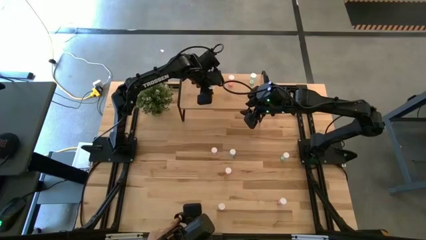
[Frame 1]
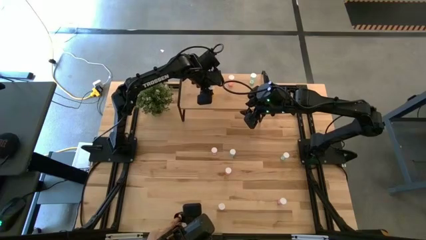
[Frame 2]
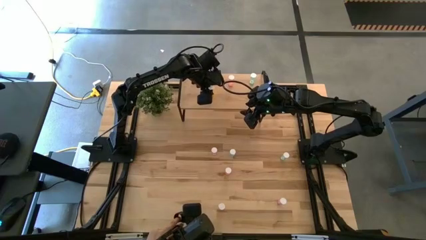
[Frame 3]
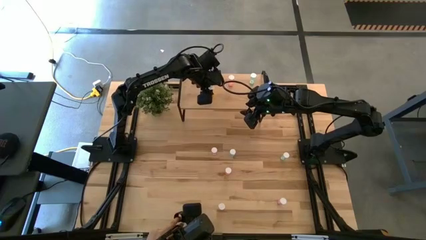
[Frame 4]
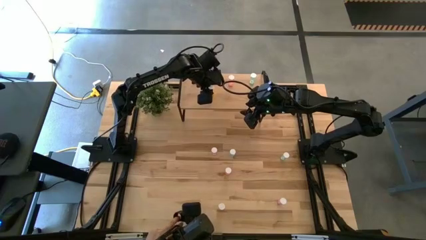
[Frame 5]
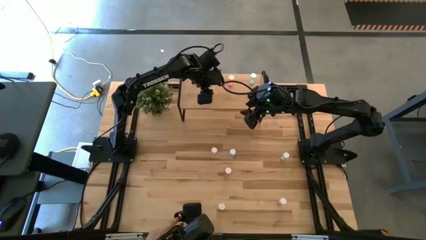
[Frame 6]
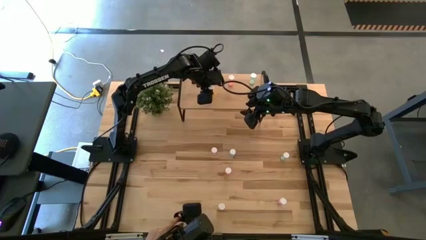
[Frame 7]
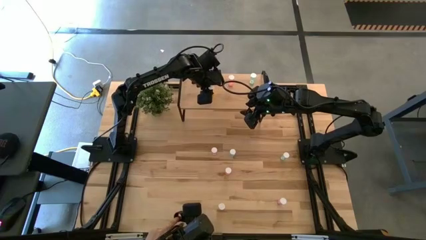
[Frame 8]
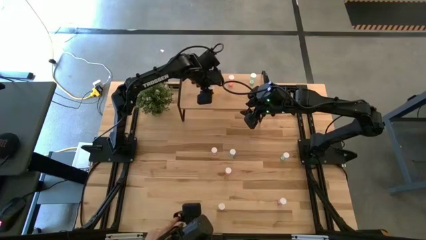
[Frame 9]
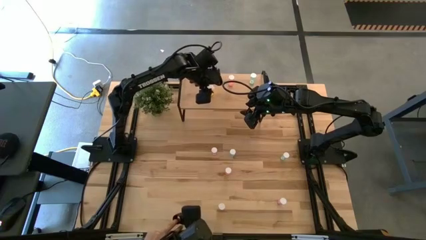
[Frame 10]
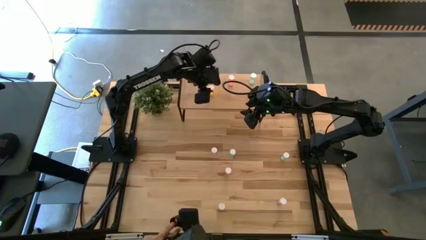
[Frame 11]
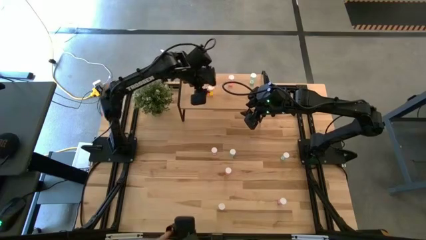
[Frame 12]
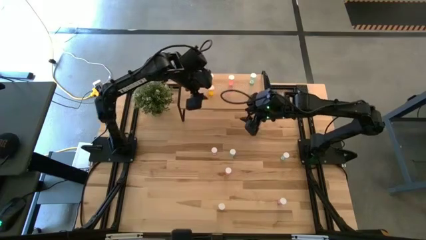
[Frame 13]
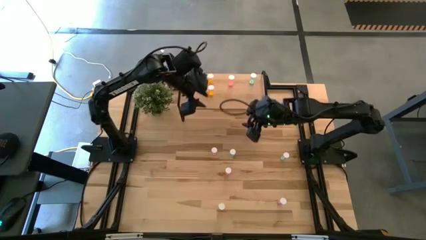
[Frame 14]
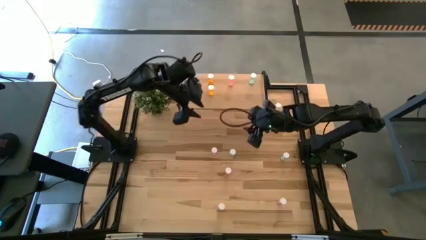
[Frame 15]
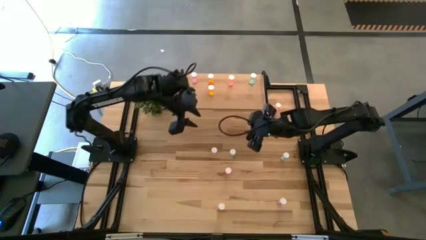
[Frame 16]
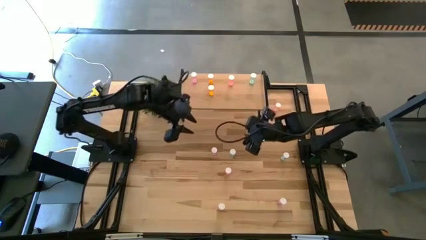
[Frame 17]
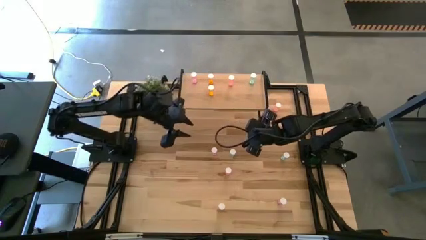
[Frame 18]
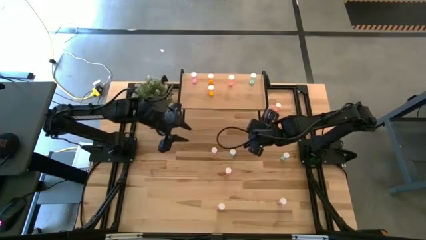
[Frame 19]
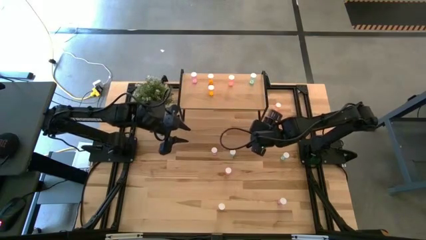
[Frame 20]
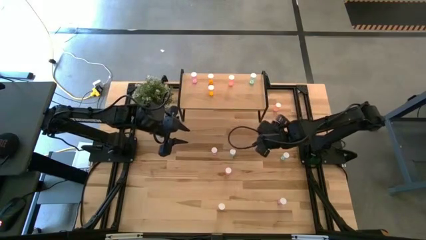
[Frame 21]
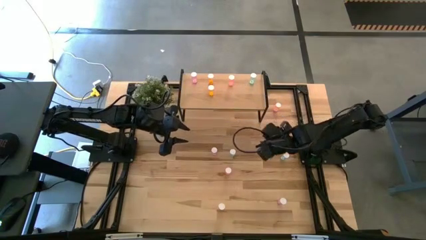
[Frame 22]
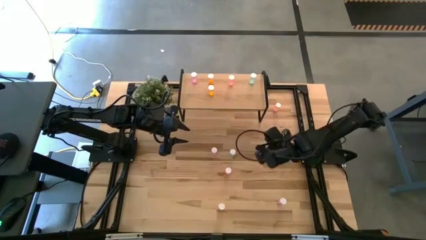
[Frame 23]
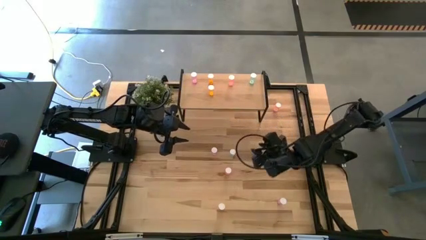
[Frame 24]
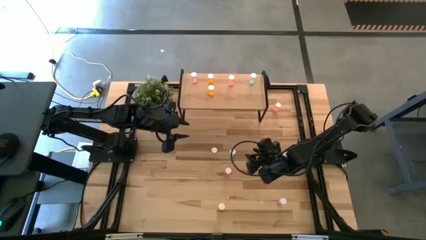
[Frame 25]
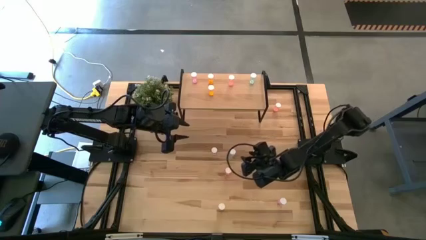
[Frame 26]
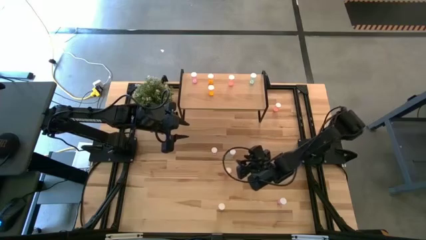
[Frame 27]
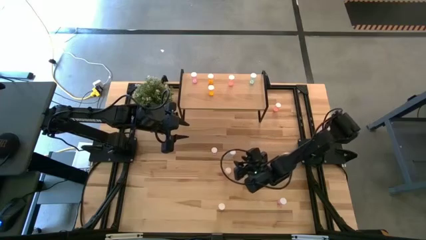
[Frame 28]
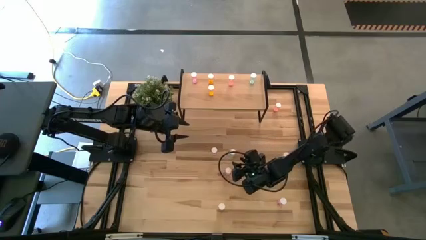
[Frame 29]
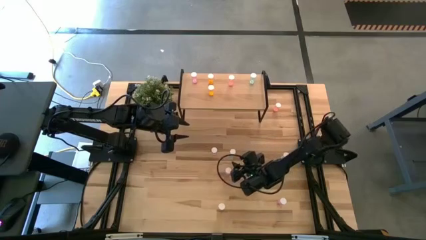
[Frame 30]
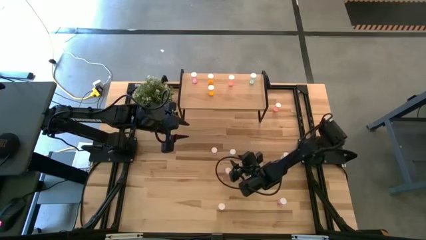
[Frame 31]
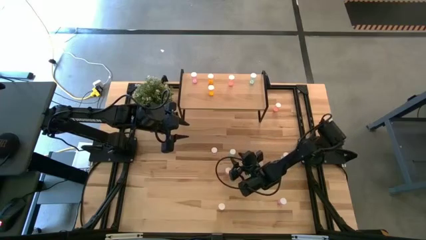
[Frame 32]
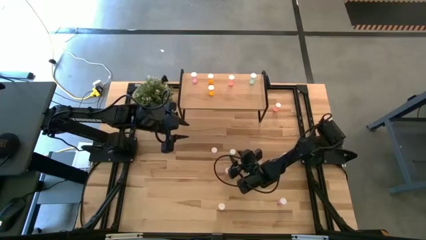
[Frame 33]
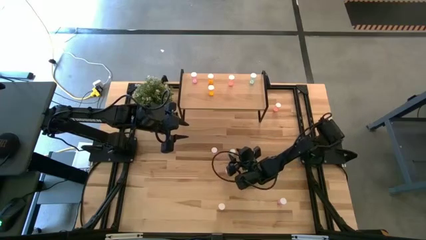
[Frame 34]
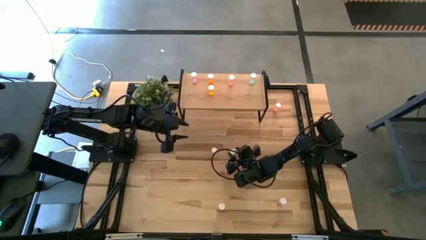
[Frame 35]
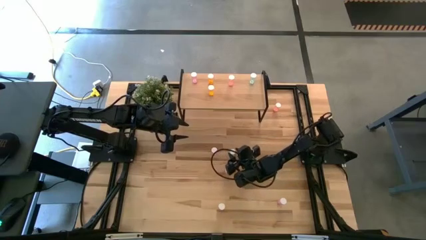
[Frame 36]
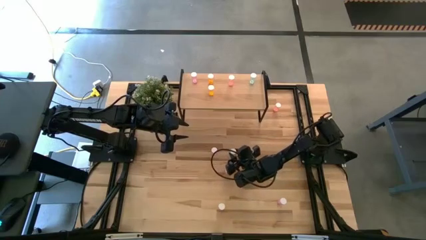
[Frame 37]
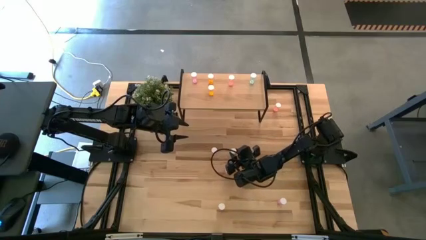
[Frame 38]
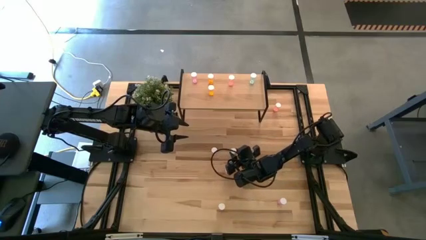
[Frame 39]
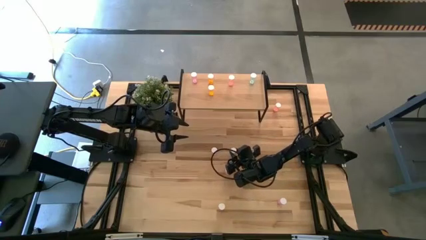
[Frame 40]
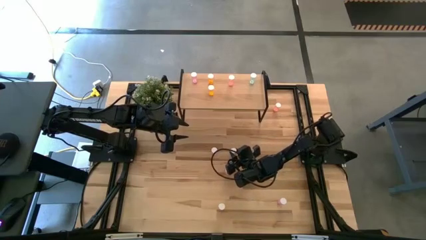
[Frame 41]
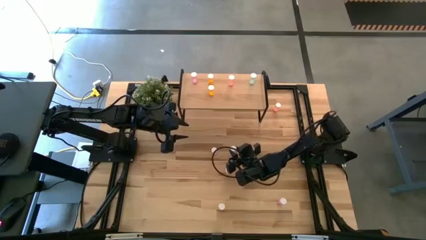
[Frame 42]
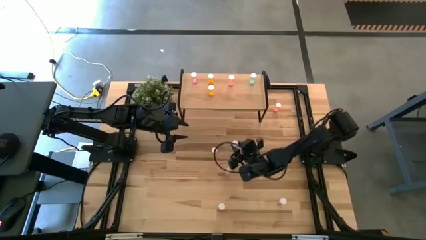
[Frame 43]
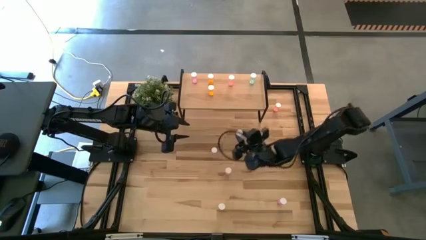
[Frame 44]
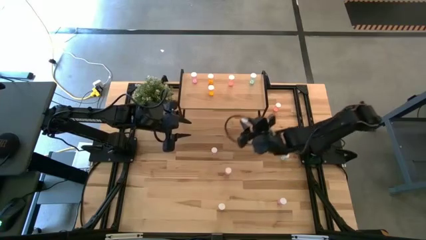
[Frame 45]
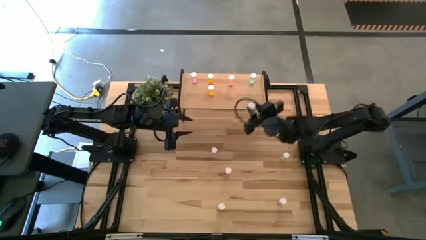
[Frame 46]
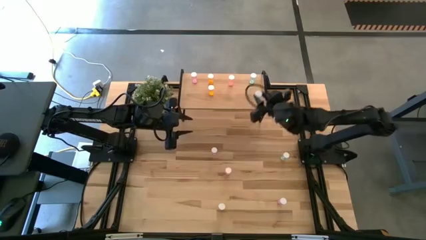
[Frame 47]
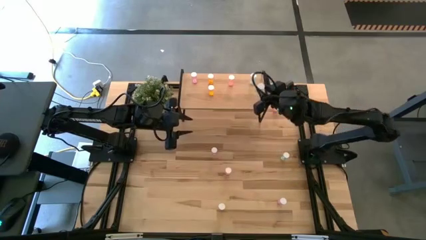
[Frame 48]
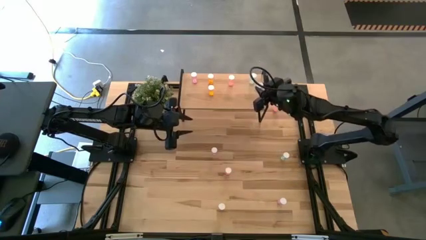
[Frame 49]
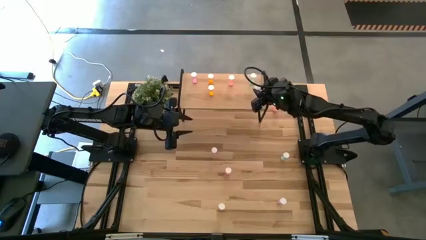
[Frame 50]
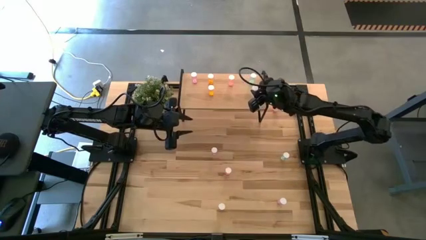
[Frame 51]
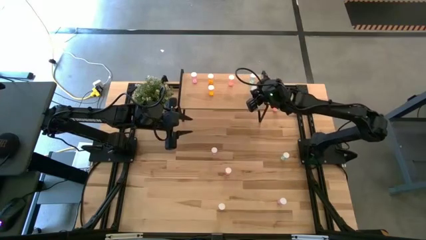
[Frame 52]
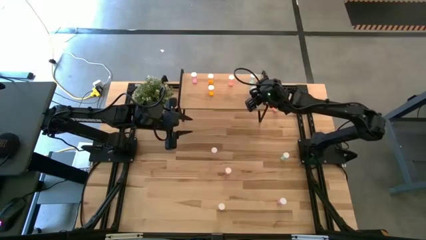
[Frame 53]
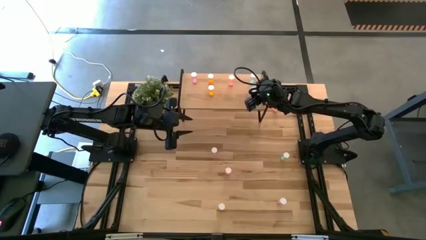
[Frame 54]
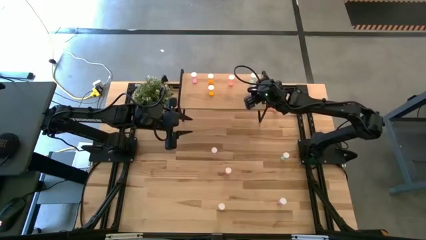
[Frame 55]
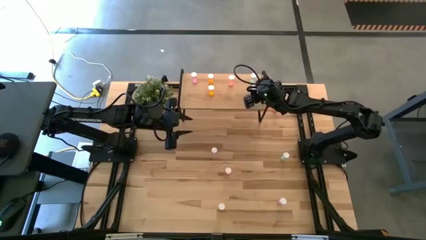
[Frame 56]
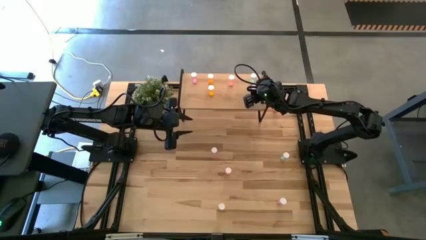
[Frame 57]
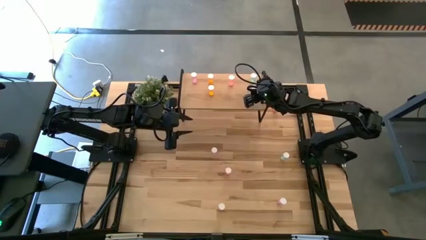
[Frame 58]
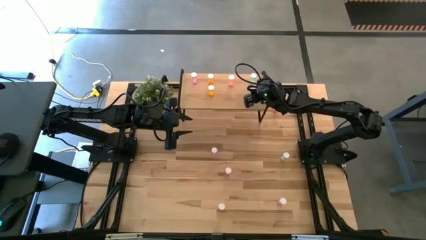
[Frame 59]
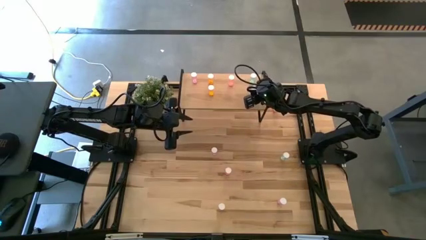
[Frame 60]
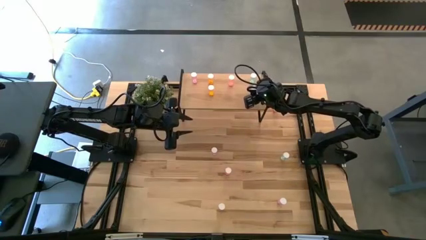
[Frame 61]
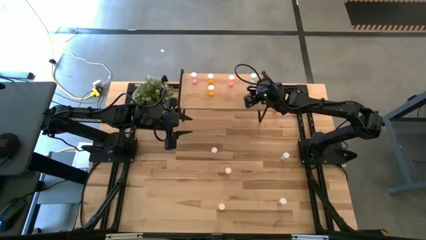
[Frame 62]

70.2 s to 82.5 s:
Task: Pick and place medicine bottles onto shelf by color
Put the left blue pill bottle aligned with the other blue pill bottle on the shelf
